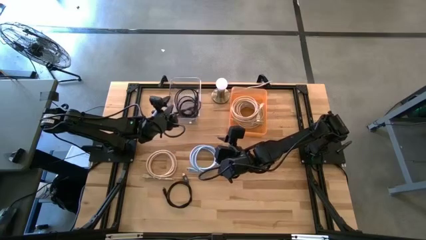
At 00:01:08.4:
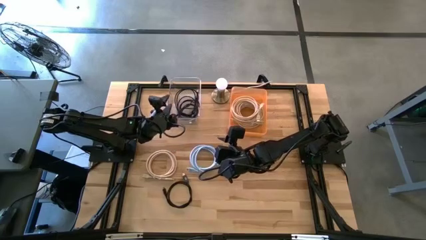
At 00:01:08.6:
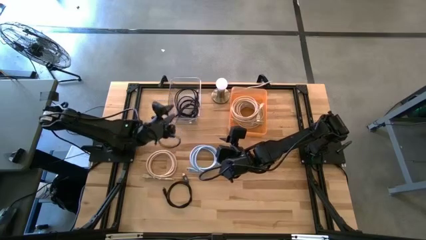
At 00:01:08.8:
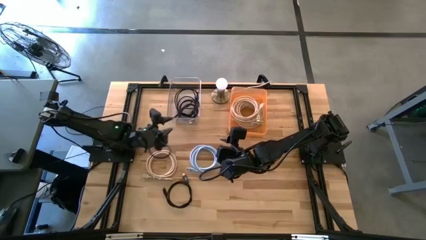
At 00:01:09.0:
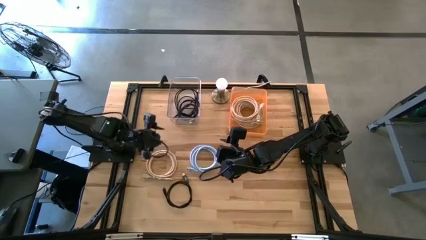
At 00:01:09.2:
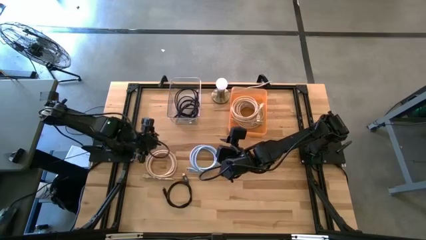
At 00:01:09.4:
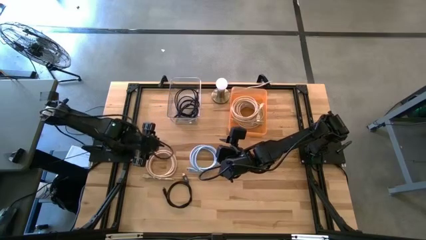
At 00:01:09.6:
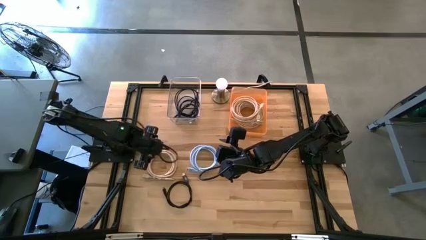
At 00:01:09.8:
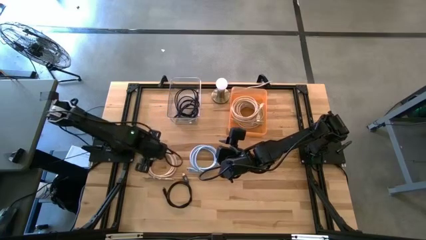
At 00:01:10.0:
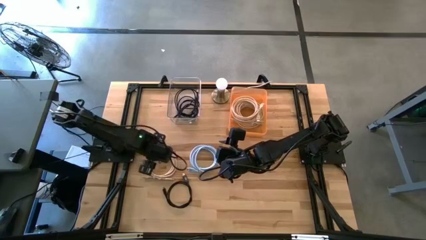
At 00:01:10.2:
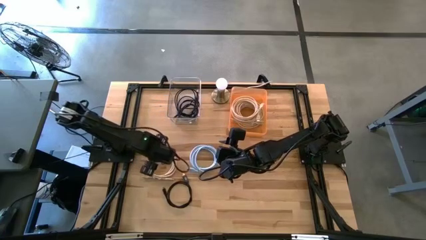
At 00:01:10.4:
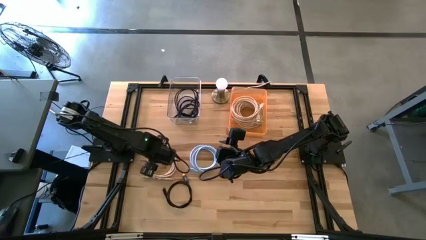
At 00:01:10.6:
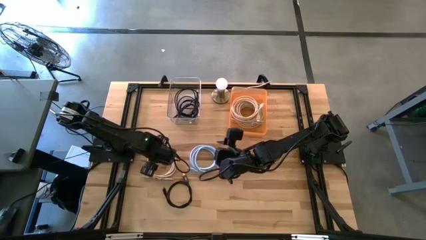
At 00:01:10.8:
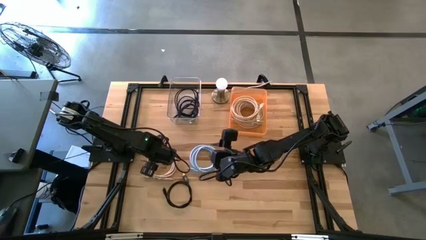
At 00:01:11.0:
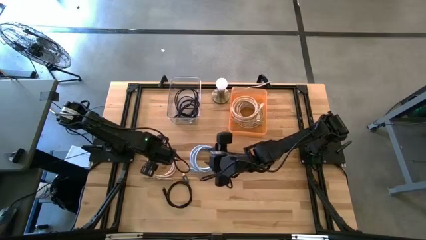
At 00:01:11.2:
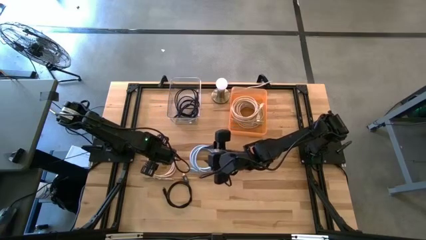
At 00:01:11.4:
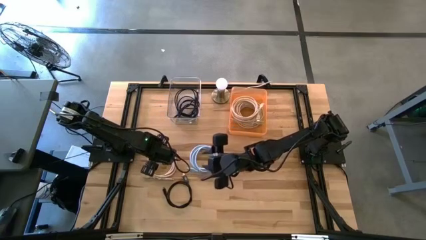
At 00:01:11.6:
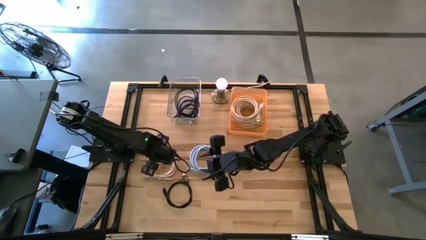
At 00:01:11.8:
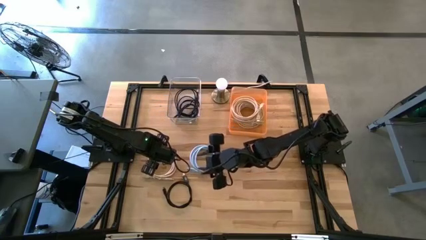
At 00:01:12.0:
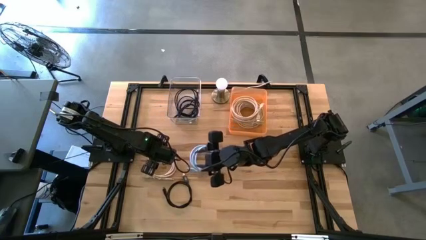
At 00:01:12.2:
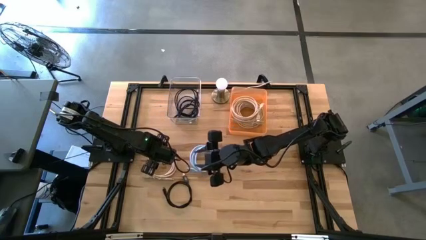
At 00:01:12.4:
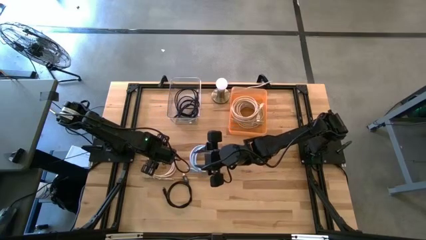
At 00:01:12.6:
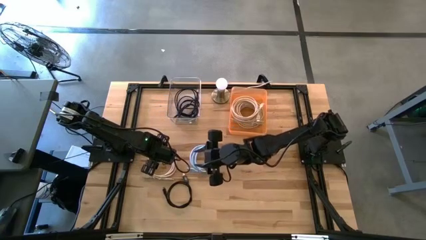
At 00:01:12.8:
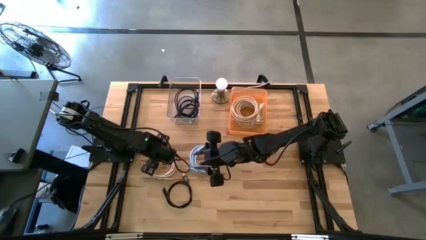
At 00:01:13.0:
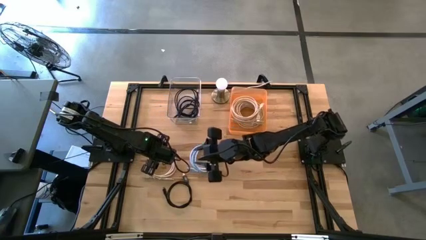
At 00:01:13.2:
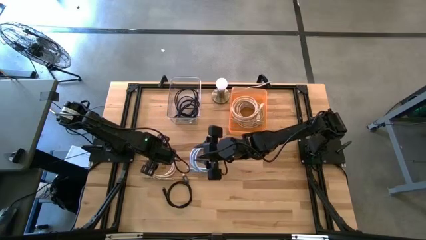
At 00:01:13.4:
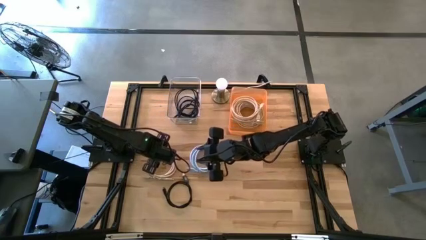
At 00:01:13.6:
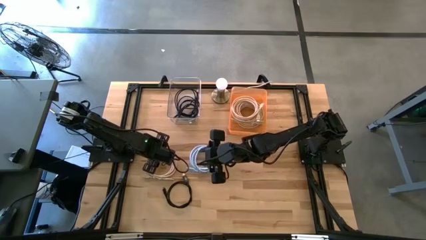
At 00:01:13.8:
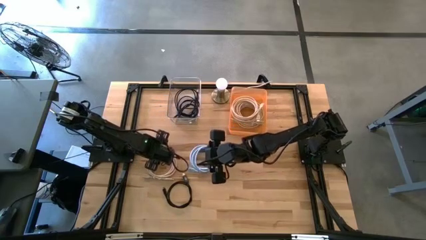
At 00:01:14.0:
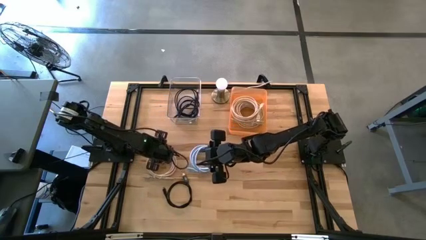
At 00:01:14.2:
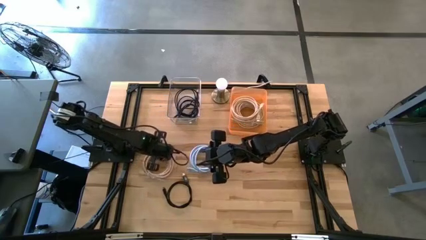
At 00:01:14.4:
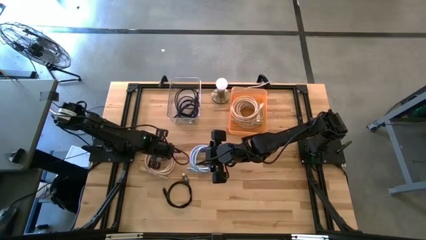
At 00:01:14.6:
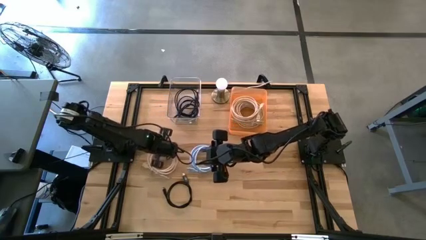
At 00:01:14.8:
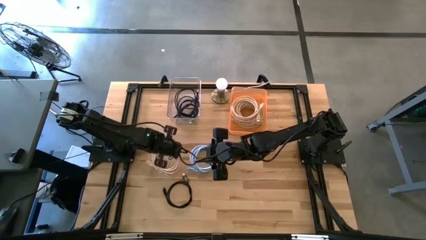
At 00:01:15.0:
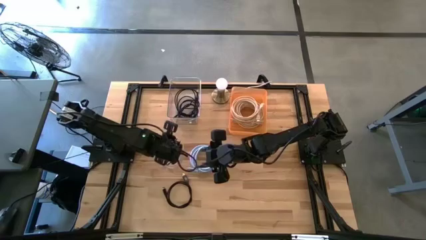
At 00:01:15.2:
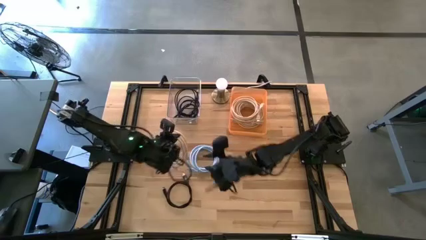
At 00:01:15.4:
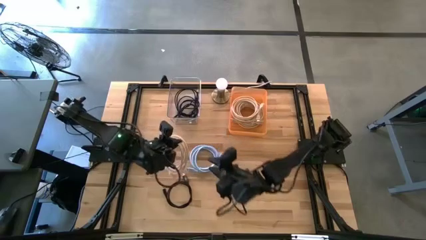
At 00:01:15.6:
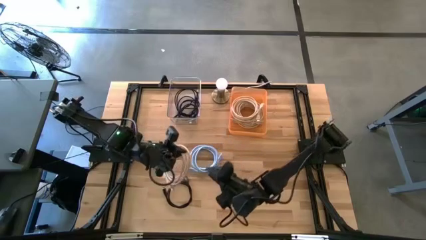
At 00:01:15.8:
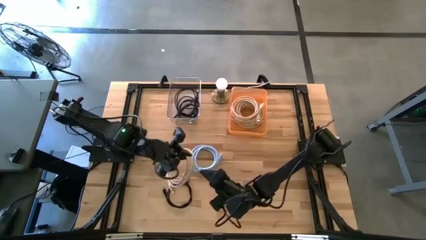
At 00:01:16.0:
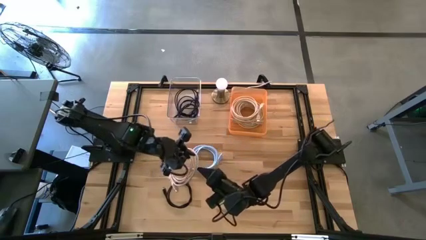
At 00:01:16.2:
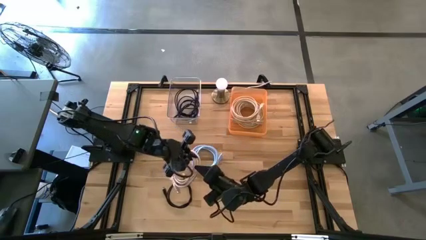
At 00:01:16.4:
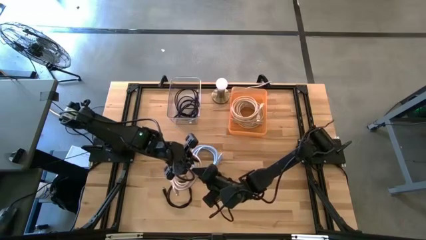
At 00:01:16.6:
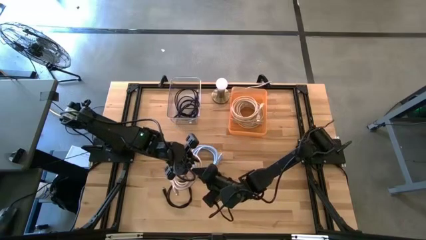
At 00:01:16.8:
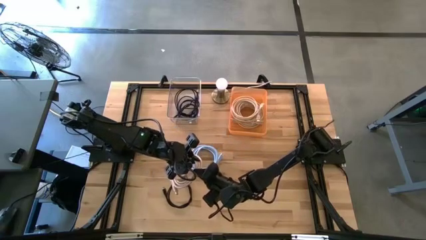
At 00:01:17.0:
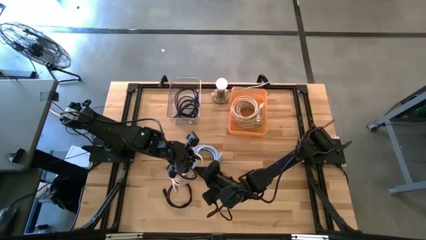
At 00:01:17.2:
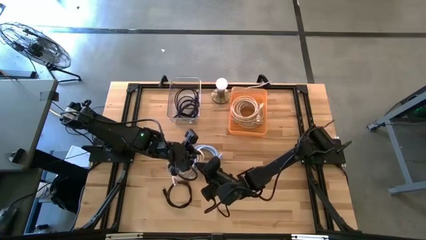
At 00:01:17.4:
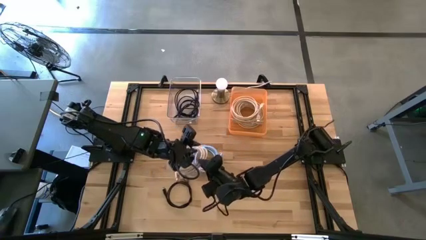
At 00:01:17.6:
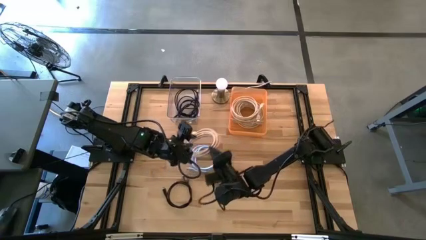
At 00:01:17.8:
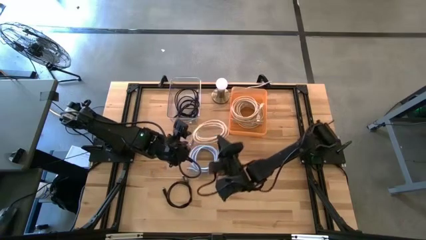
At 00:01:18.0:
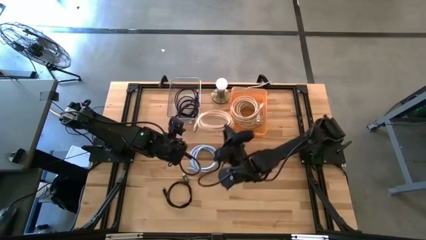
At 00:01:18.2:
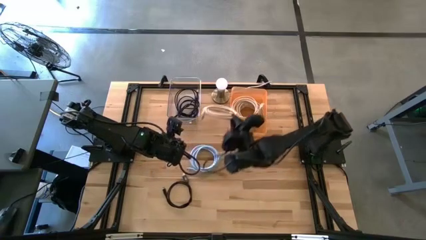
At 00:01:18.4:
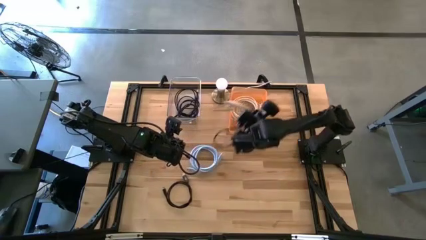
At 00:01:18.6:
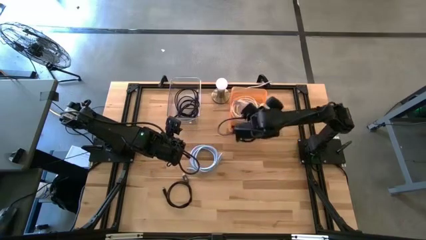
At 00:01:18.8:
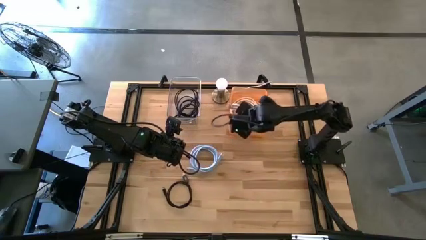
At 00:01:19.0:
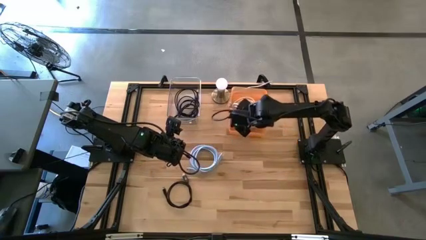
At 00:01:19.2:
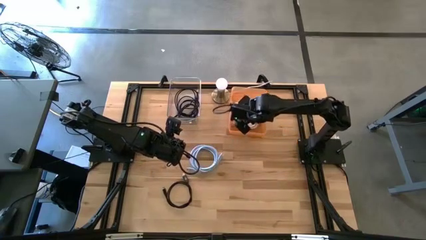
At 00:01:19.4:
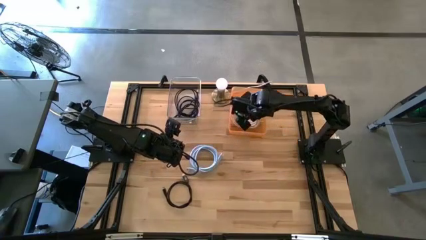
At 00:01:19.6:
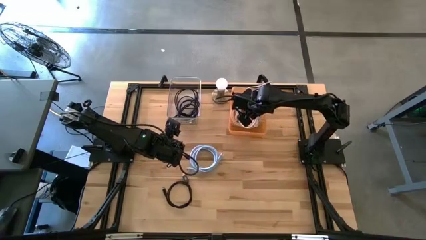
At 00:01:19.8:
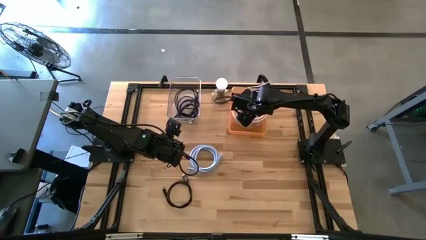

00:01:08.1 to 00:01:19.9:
Task: Pick & Place USB Port
Put the light brown charger cable into the orange bin

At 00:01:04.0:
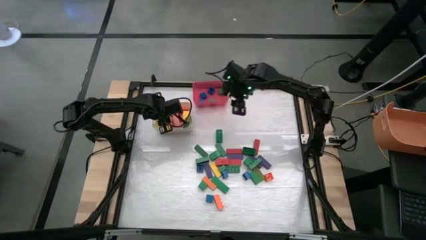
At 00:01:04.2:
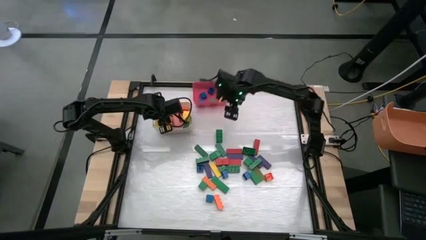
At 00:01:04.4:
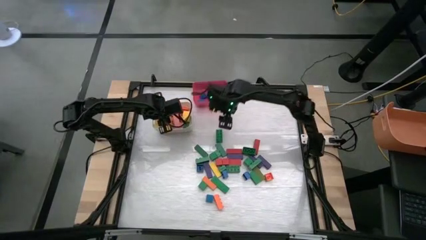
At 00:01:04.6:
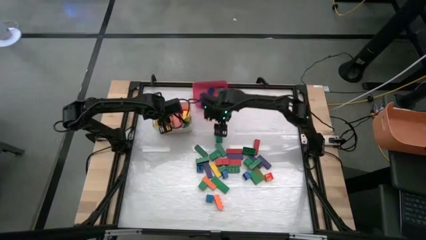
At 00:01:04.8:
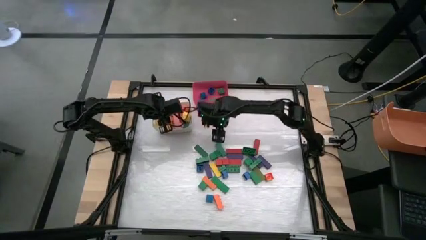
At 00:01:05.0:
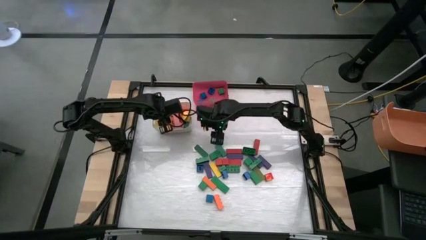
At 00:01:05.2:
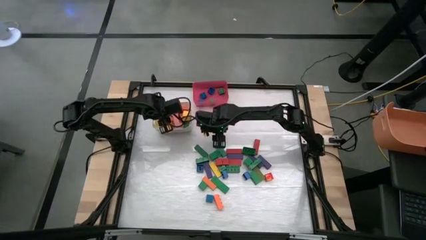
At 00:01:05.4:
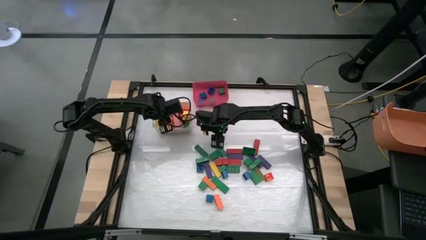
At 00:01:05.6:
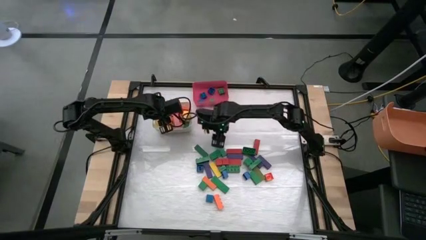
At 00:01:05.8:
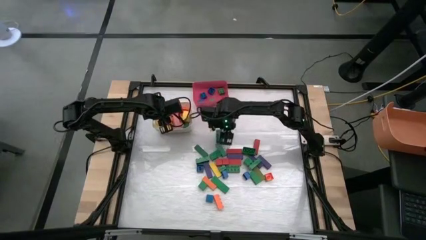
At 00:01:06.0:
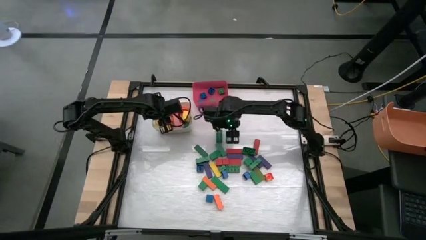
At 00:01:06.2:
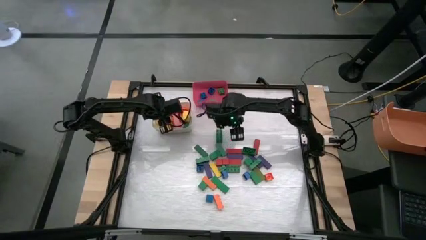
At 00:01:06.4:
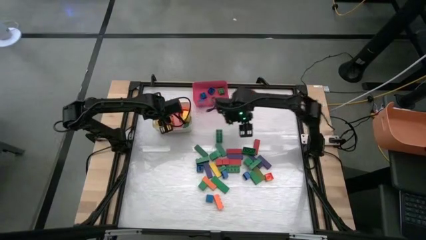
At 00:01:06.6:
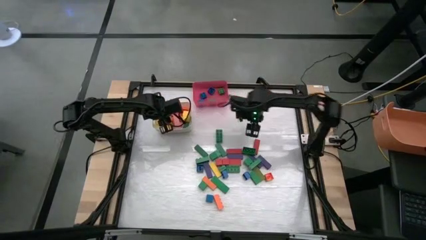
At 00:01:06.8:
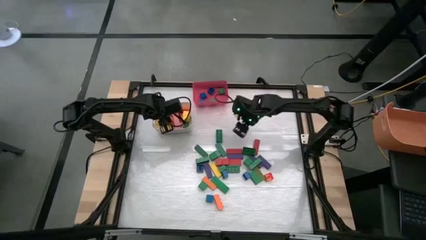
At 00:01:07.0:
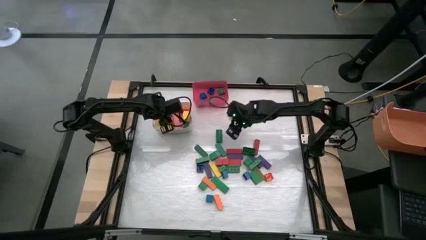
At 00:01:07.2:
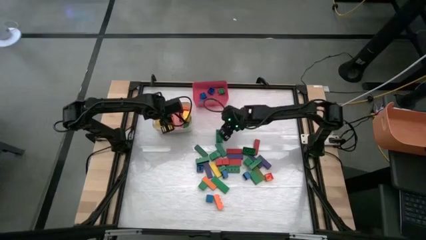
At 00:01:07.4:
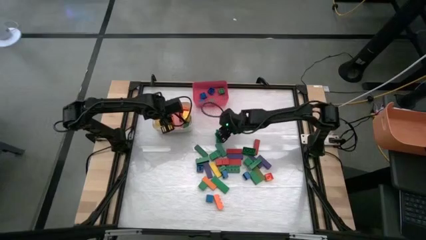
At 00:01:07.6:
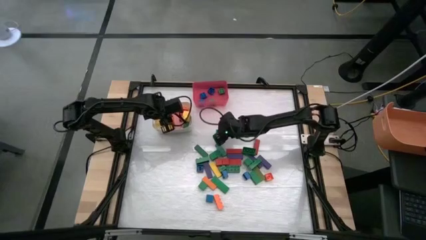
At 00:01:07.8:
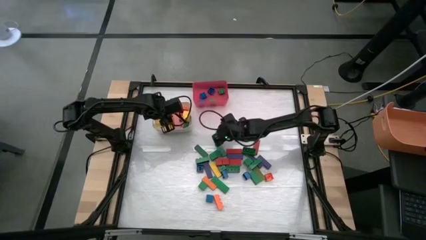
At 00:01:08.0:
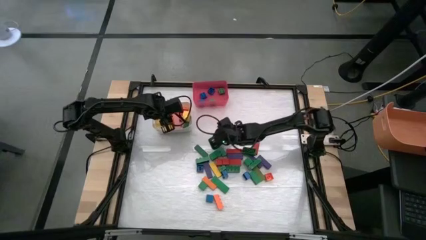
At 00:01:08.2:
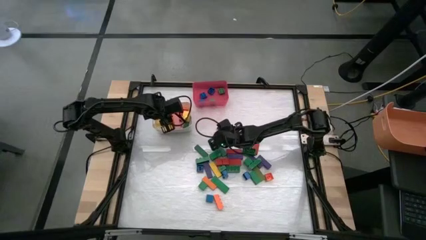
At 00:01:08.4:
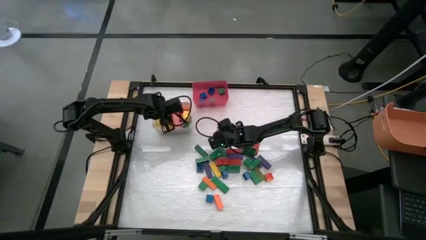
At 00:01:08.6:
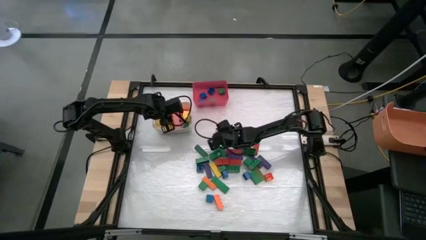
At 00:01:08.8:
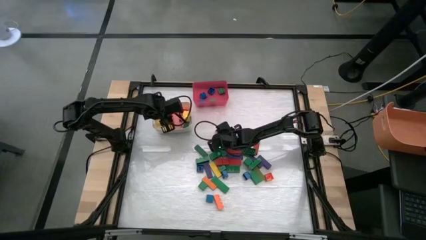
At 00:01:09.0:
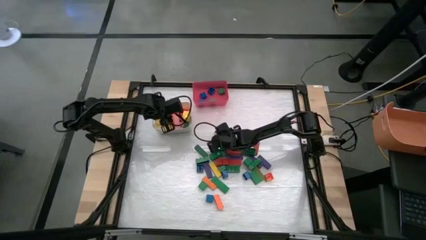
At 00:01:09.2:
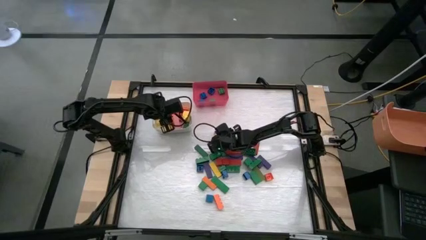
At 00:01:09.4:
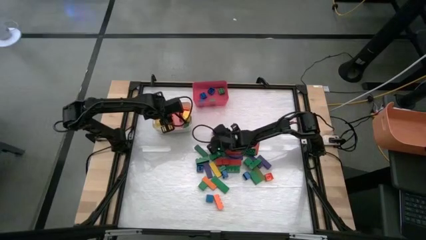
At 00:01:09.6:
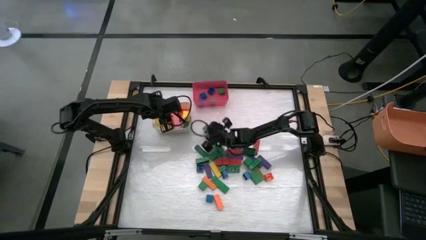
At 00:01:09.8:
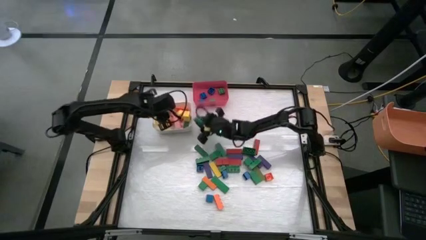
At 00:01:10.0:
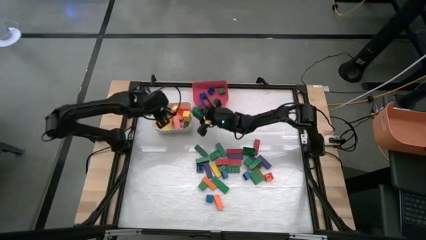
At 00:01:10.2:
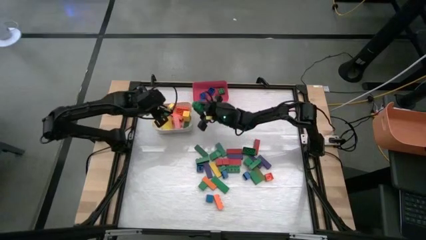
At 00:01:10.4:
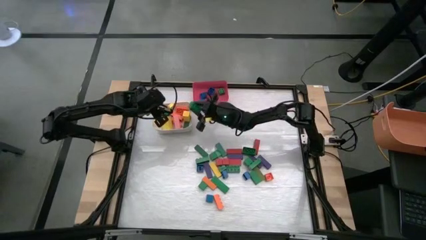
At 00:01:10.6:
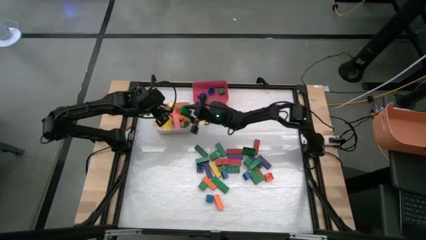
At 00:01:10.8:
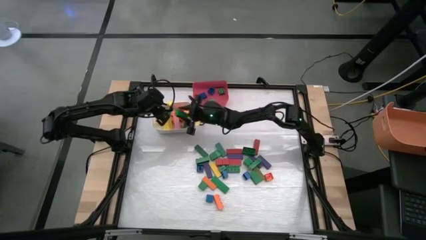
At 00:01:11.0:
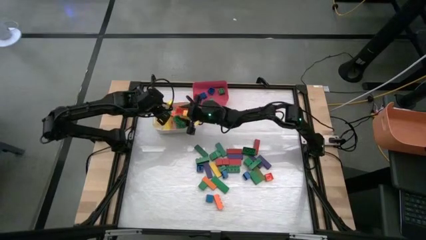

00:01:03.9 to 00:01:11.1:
Task: Sort blocks by size
Put the large green game piece into the white bin
